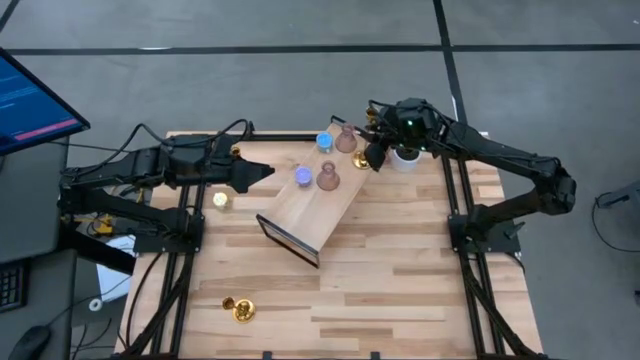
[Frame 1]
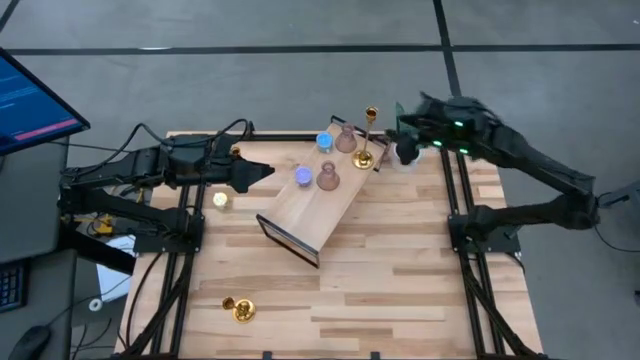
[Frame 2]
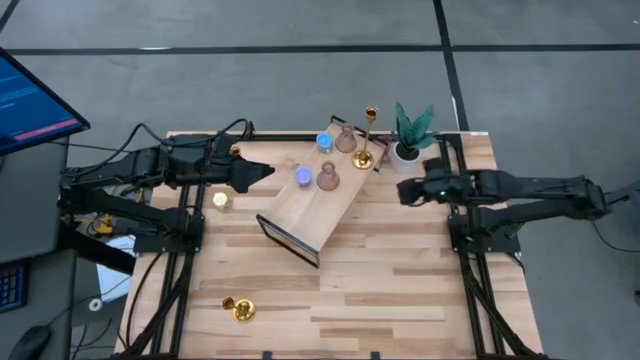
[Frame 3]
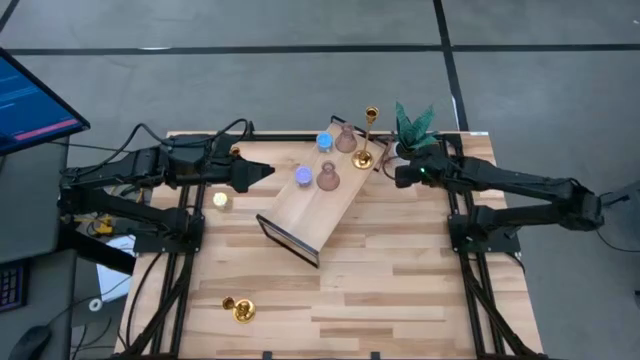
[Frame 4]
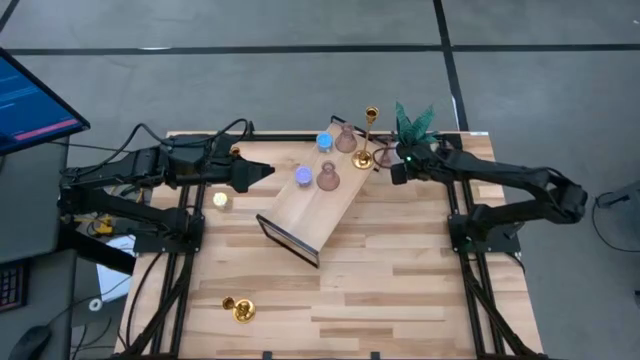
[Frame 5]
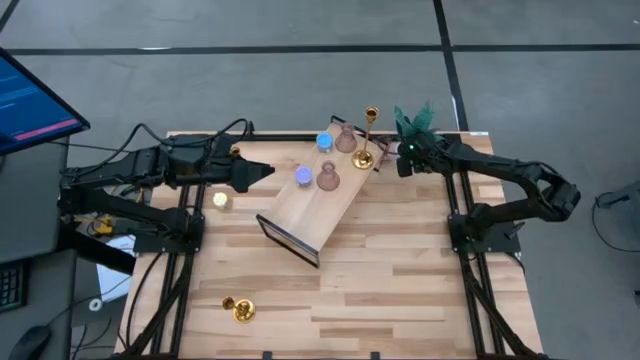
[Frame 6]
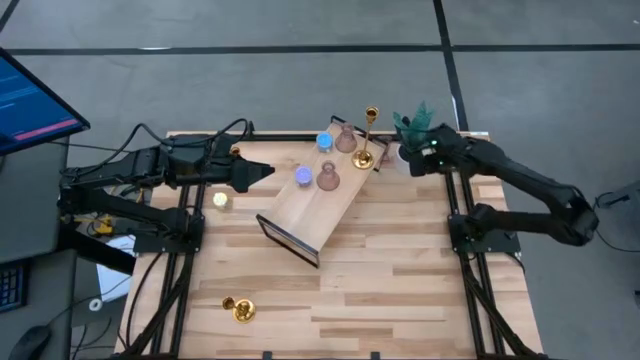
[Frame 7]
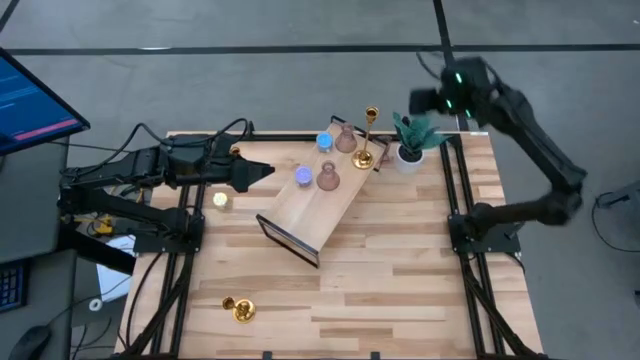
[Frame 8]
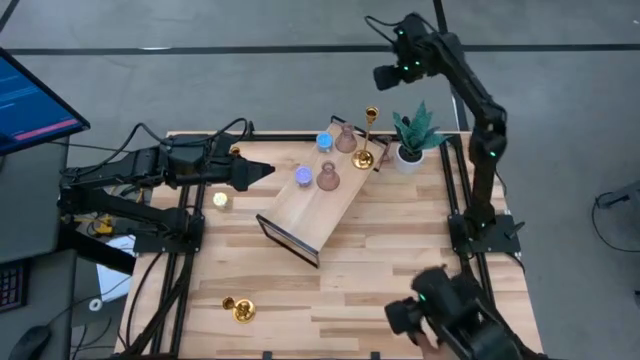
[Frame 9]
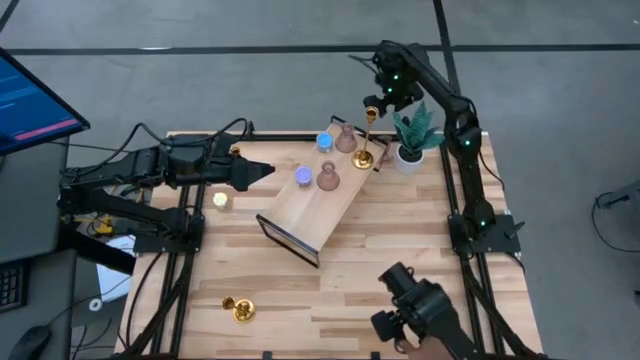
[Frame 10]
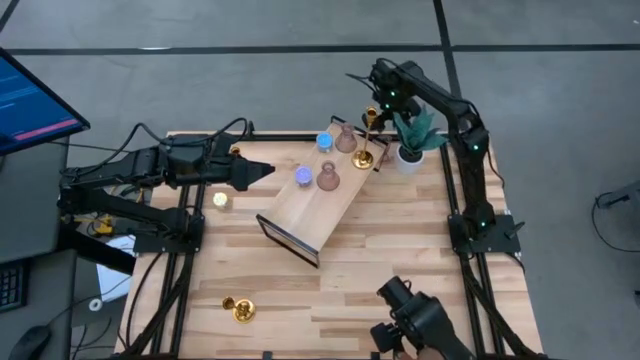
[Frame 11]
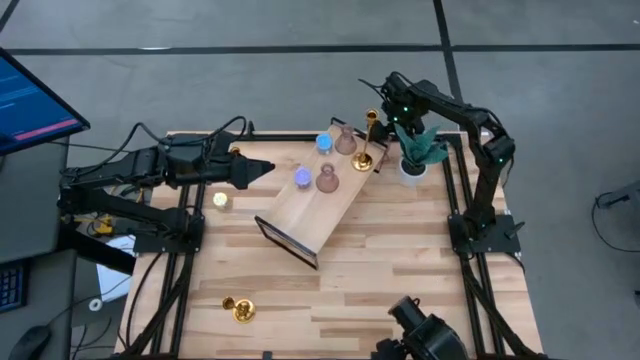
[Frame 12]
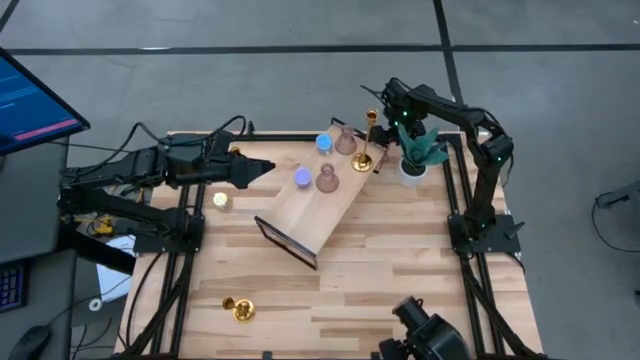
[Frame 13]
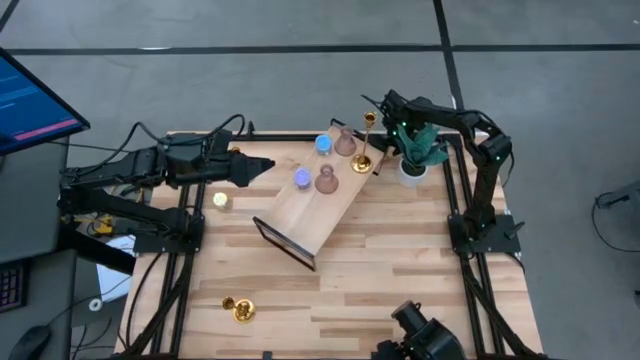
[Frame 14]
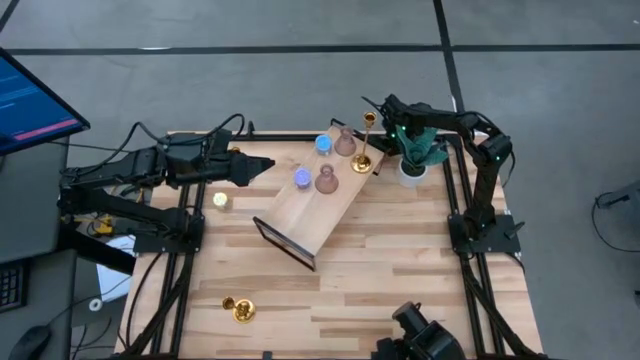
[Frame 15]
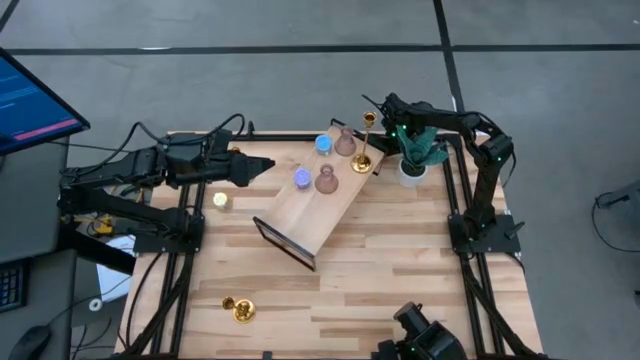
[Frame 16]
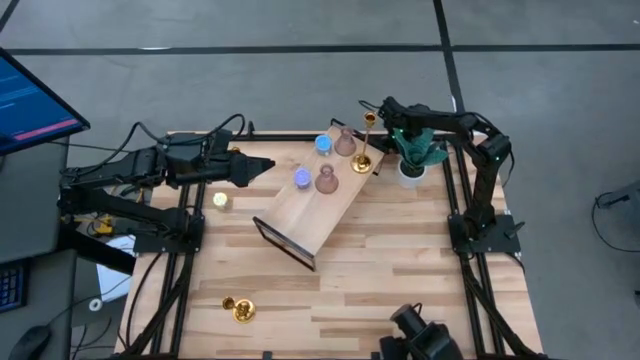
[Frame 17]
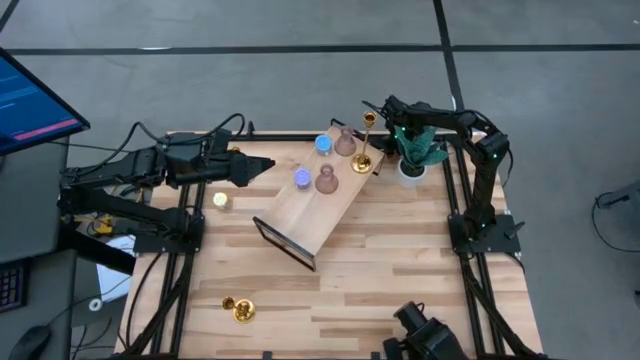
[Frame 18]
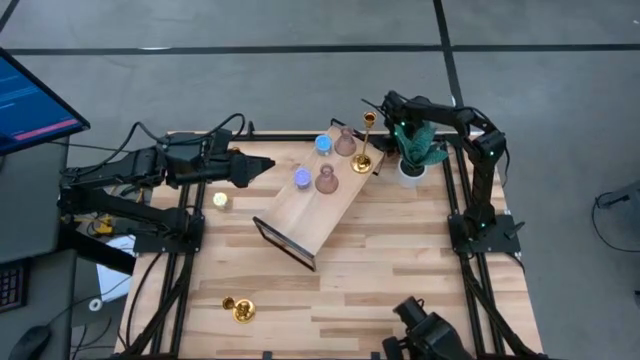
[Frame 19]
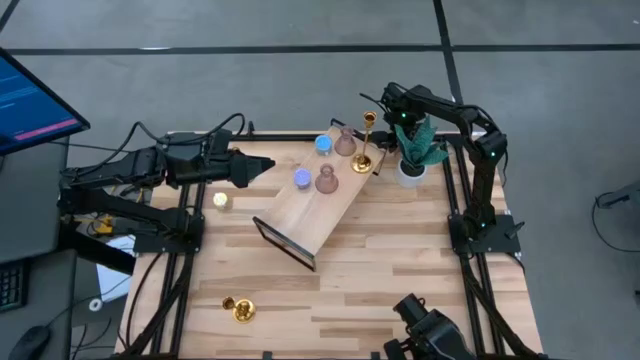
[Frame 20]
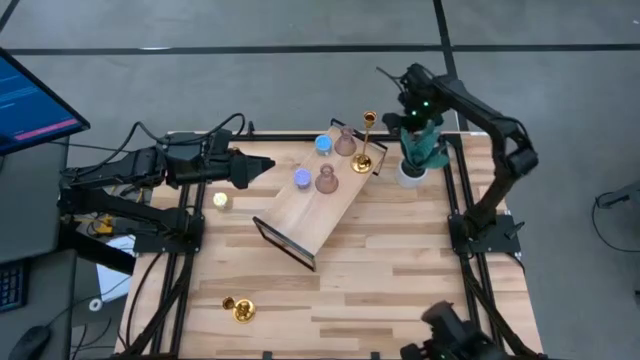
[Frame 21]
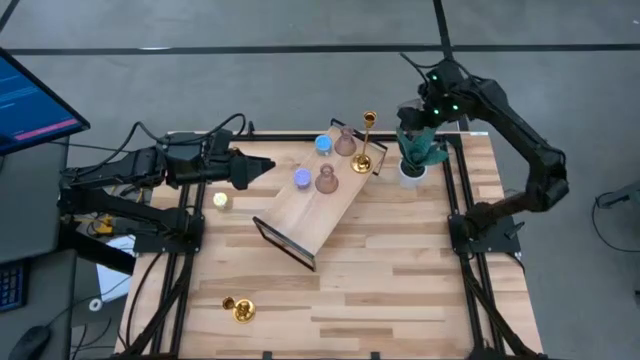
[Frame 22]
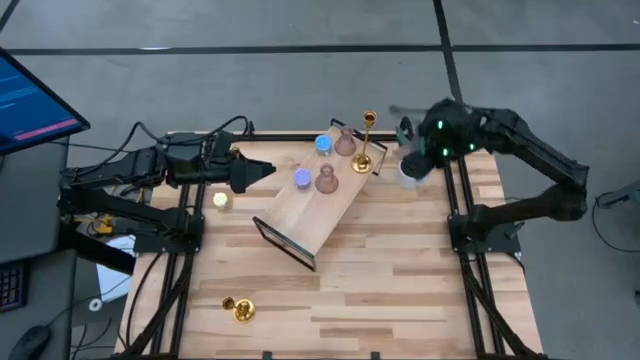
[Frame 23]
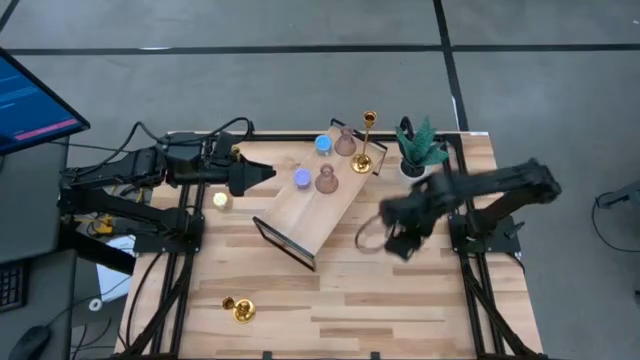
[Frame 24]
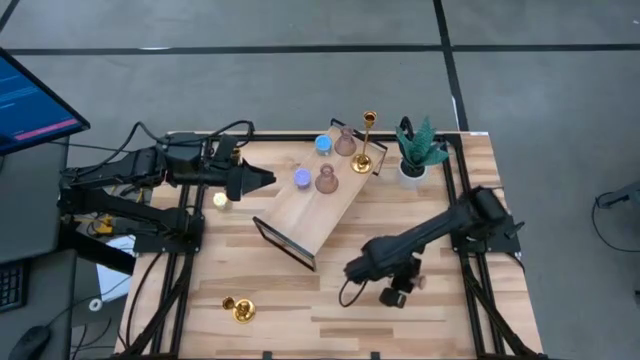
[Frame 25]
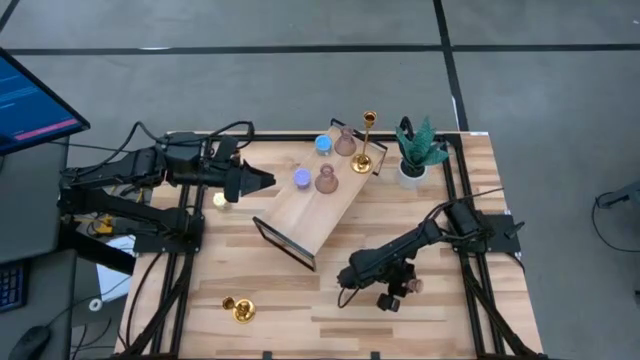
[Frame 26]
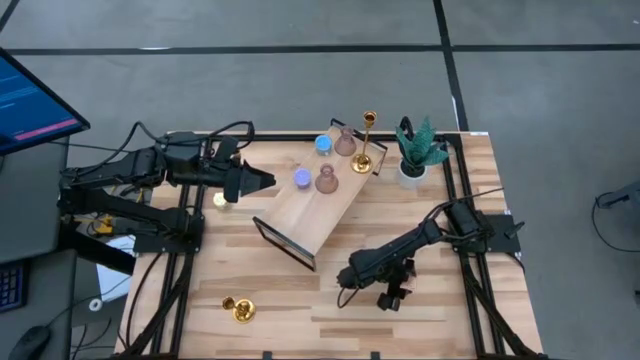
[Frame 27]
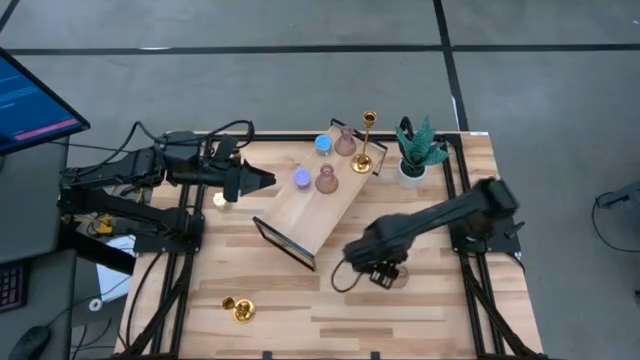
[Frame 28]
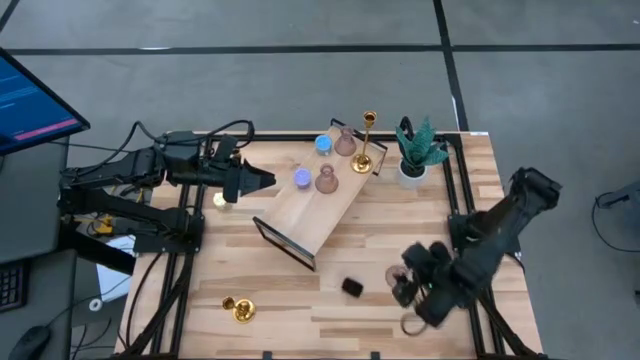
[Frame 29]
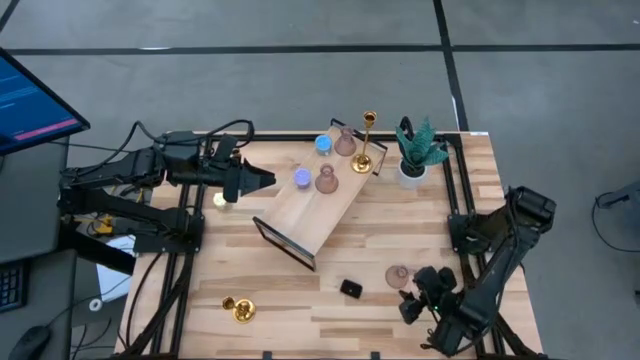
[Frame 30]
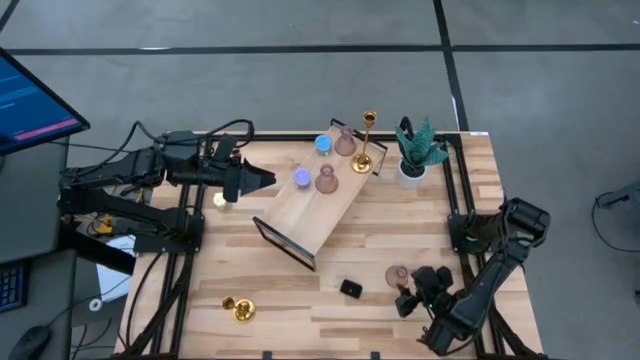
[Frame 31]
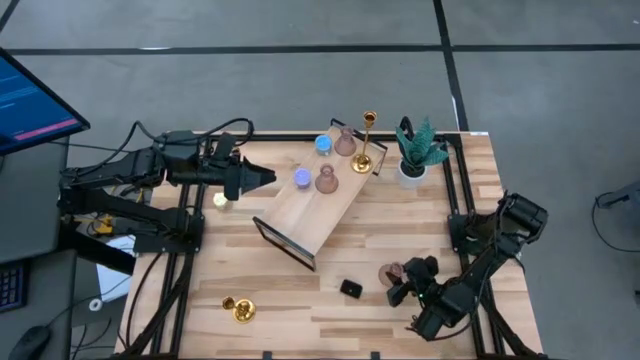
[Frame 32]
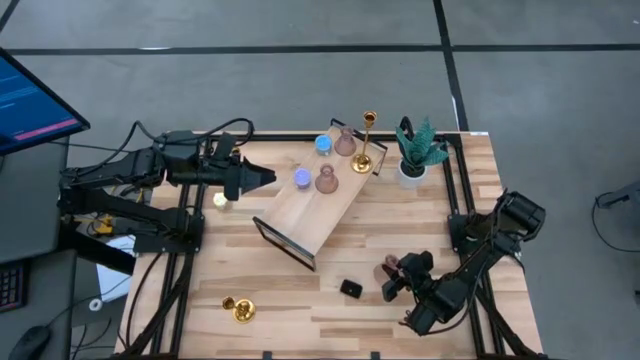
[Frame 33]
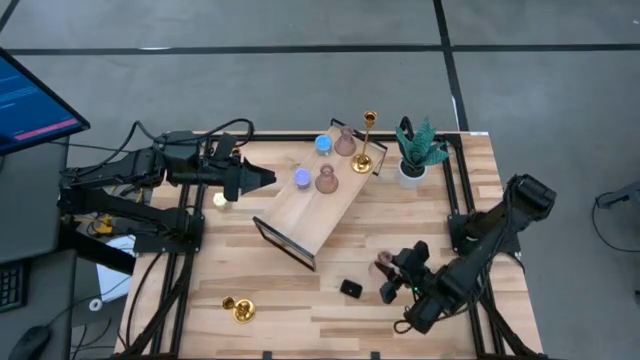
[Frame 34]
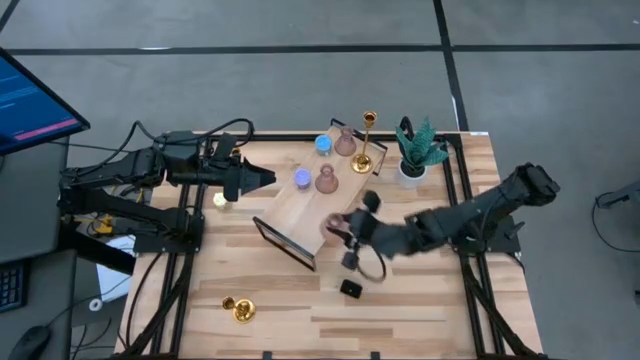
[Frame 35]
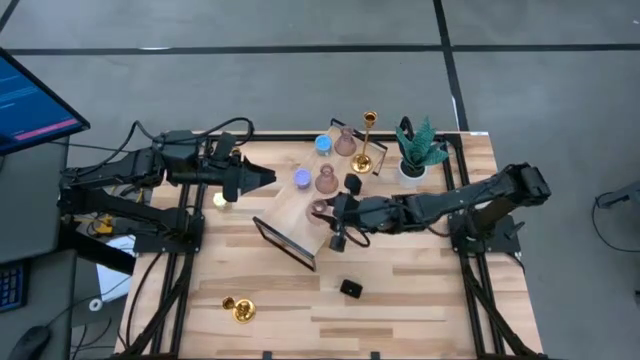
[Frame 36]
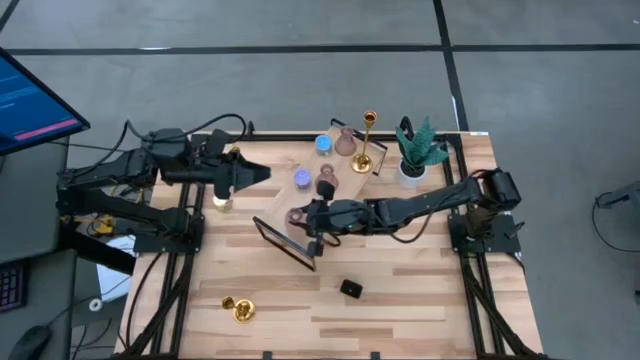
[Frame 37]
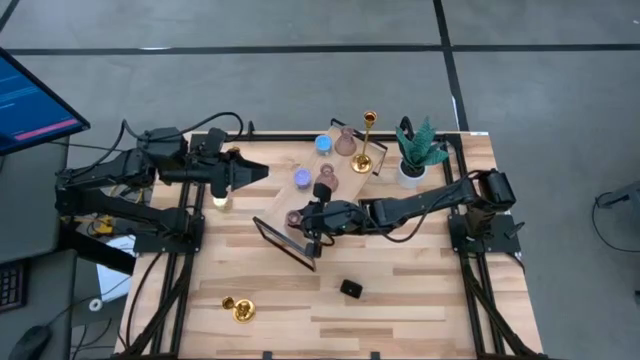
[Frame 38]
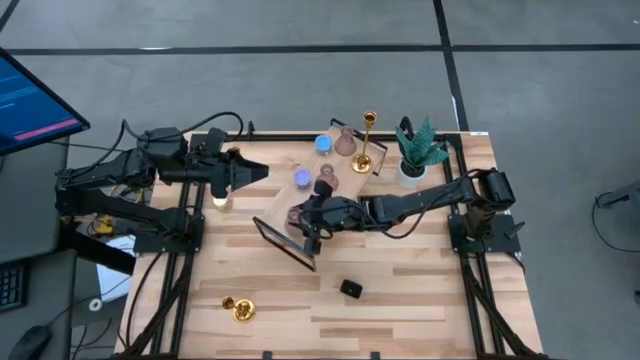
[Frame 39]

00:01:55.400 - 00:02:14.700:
Task: Pick & Place candle stick holders
Put the glass candle holder on the shelf

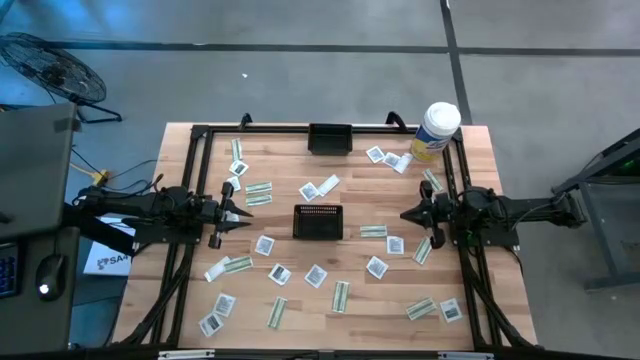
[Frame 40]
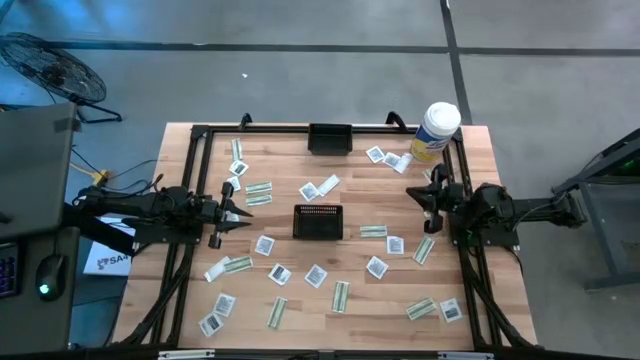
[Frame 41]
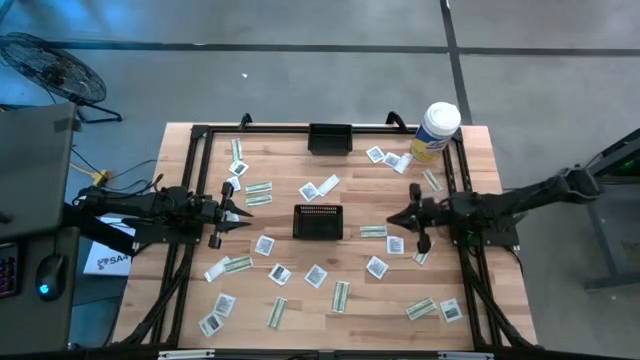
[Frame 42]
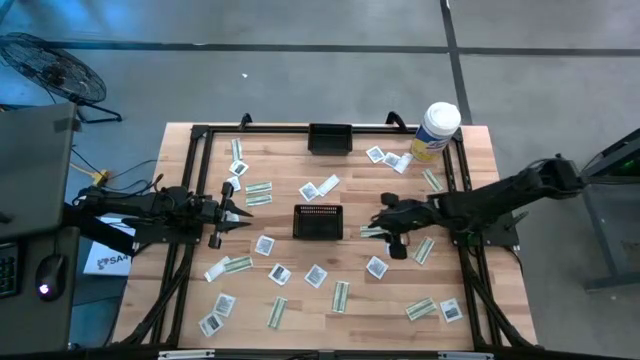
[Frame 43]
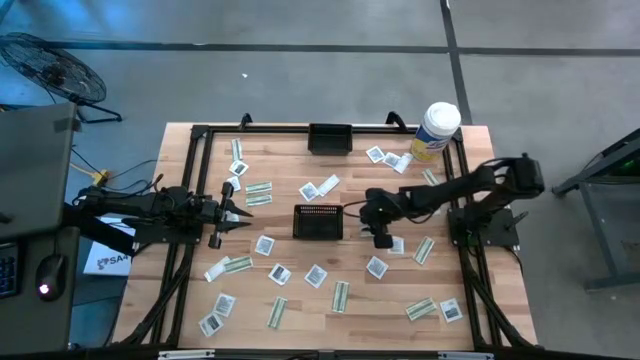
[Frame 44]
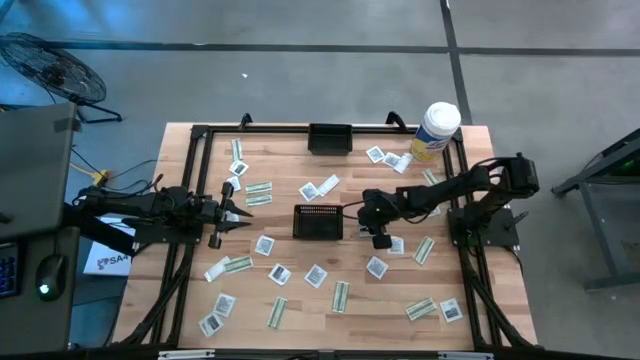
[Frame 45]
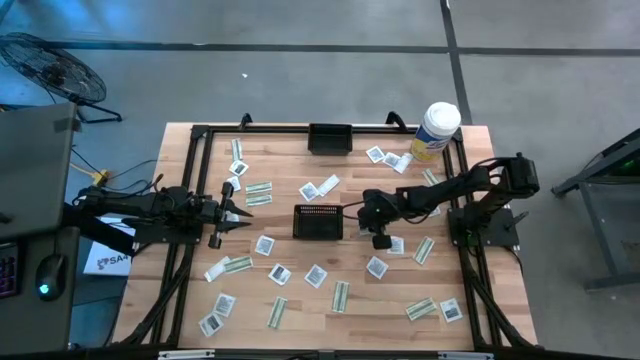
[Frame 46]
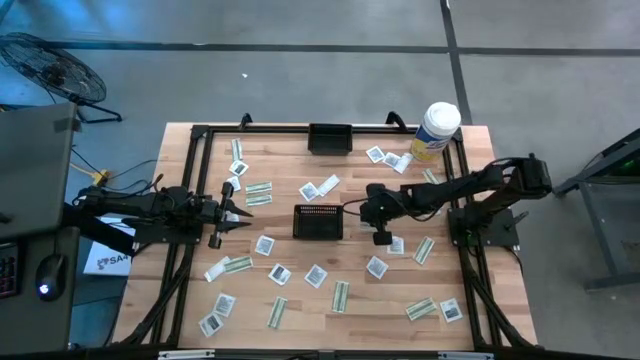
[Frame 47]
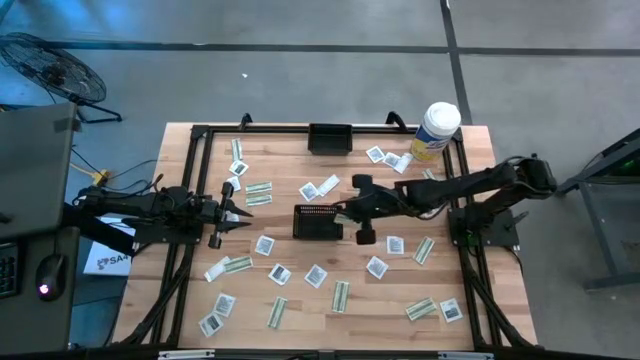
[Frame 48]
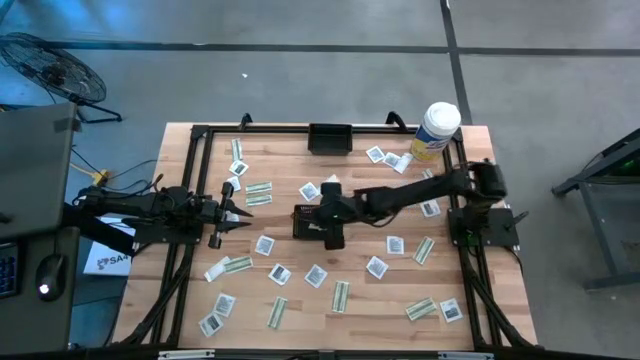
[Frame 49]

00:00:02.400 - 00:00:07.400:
Task: Pick & Place First Aid Supplies
Put the bandage into the bottom black basket
